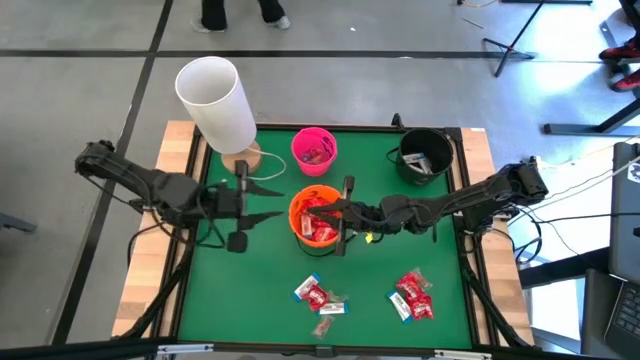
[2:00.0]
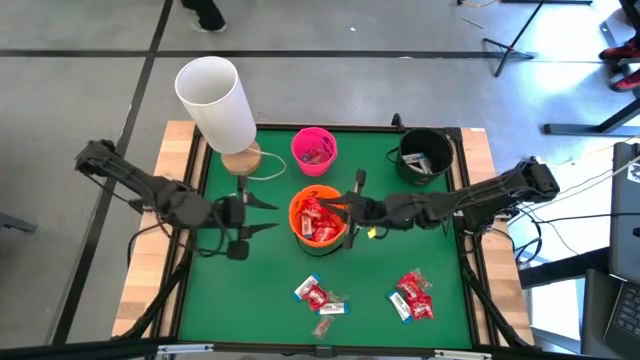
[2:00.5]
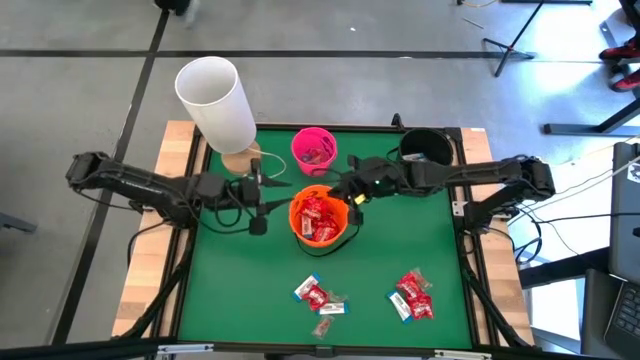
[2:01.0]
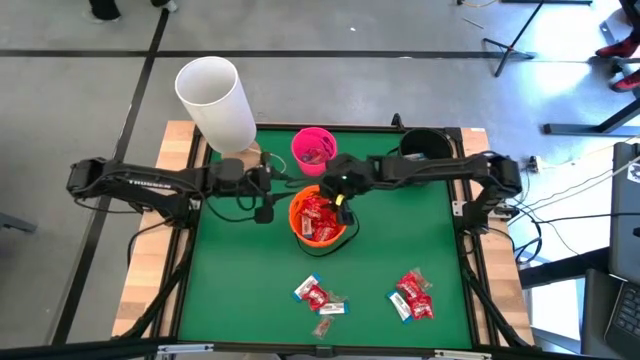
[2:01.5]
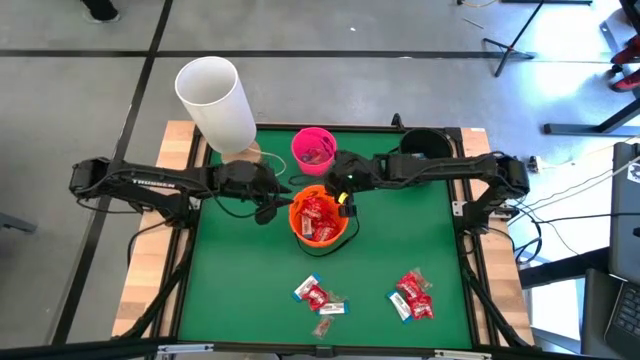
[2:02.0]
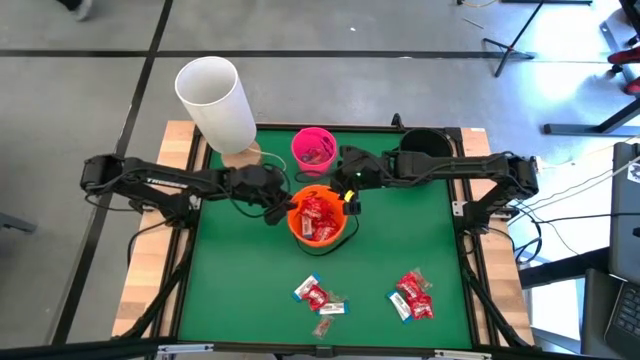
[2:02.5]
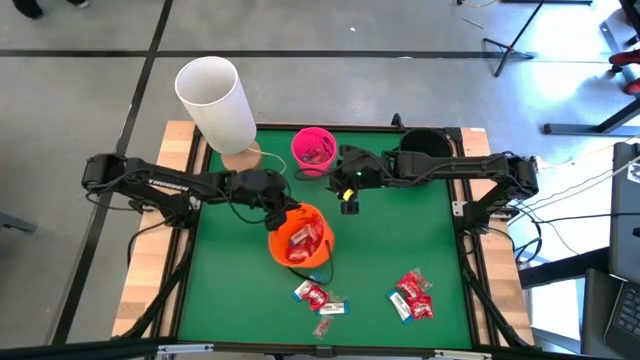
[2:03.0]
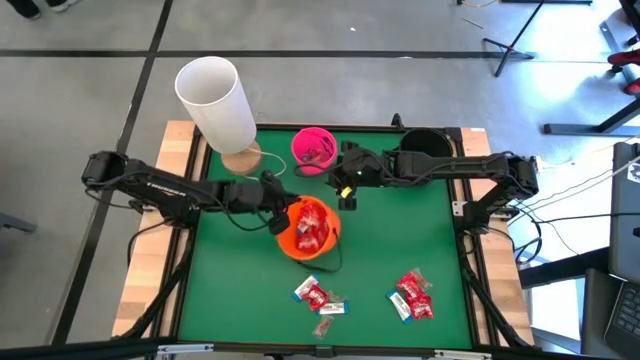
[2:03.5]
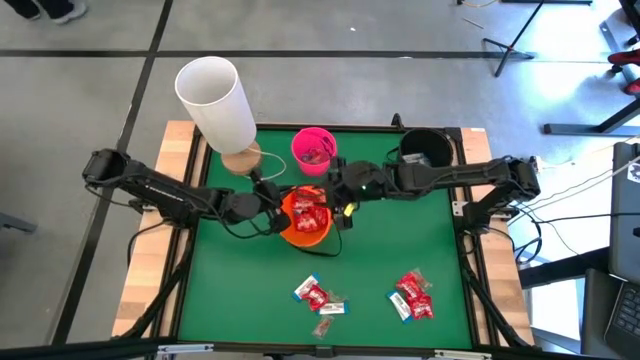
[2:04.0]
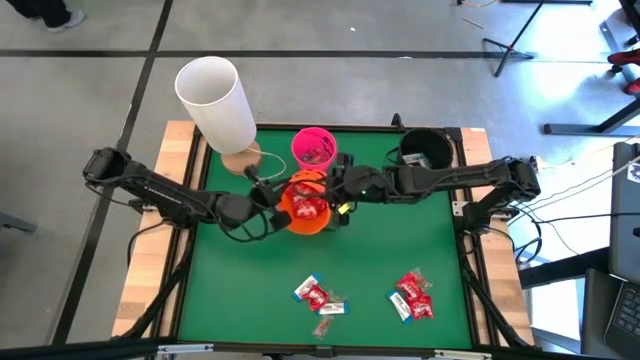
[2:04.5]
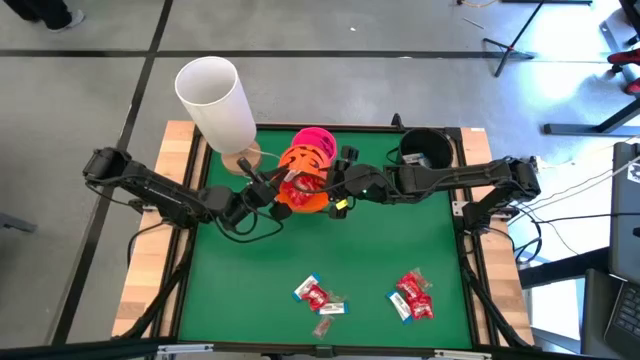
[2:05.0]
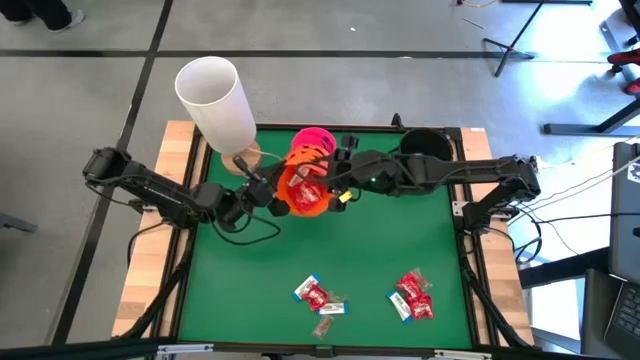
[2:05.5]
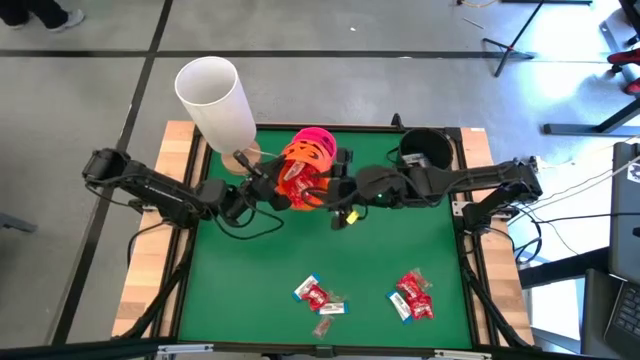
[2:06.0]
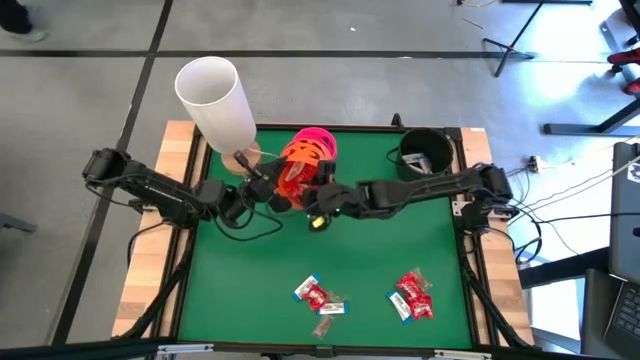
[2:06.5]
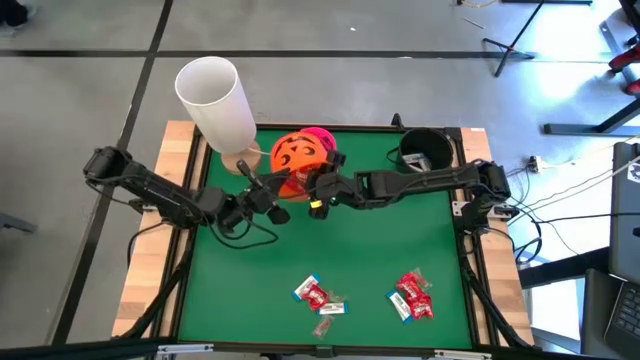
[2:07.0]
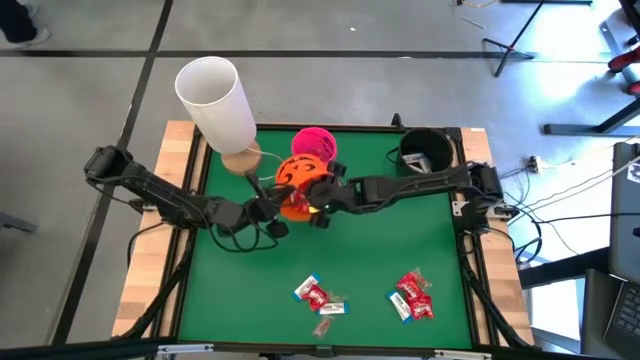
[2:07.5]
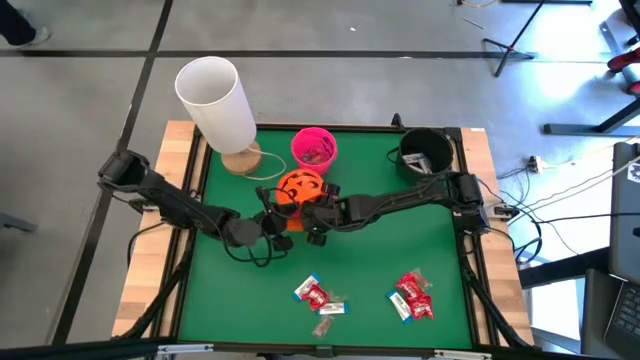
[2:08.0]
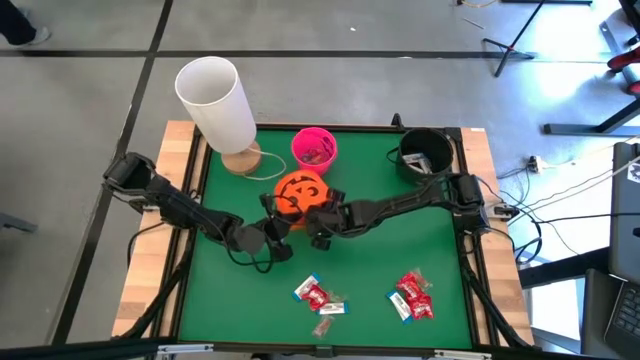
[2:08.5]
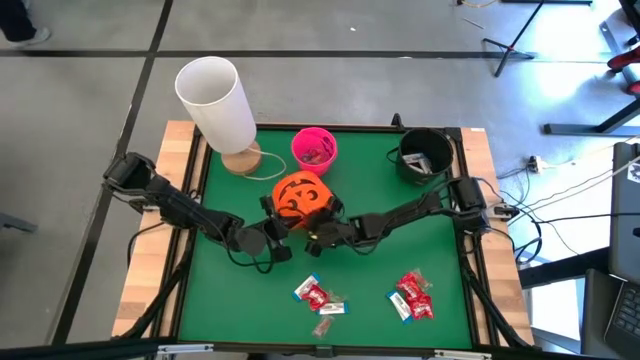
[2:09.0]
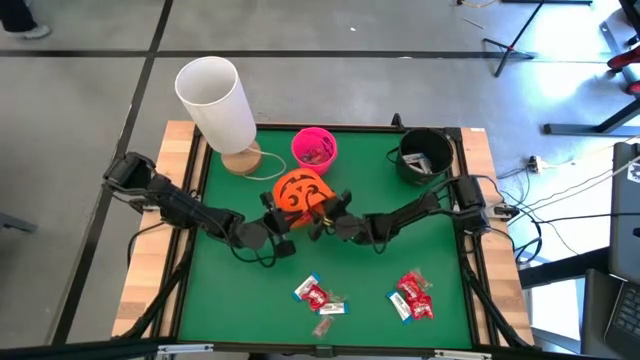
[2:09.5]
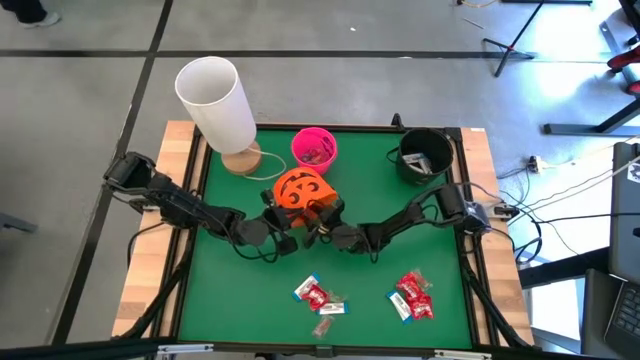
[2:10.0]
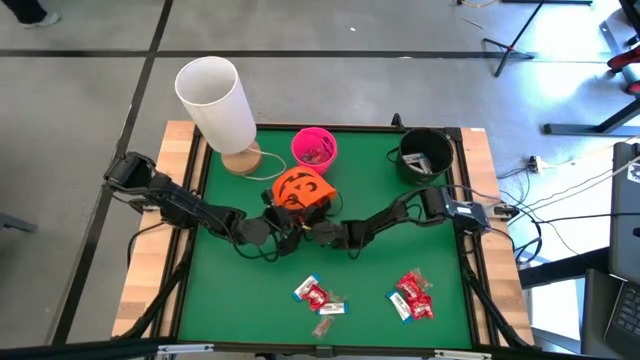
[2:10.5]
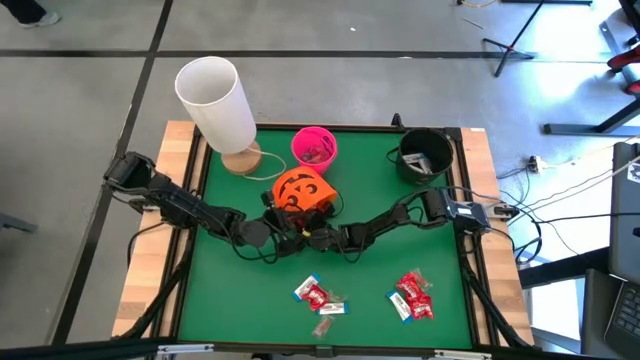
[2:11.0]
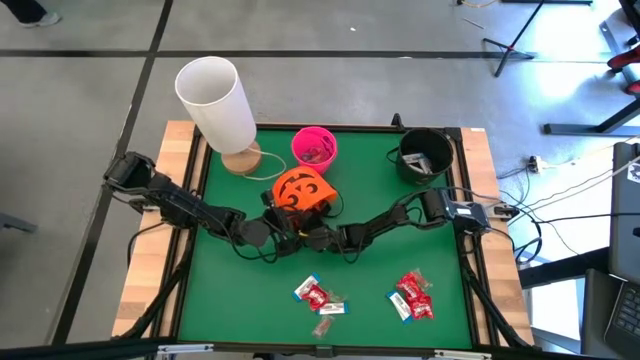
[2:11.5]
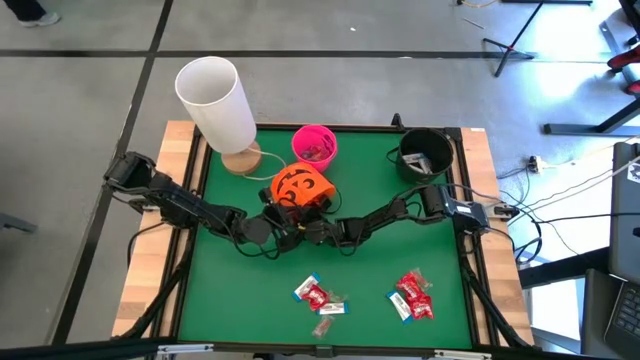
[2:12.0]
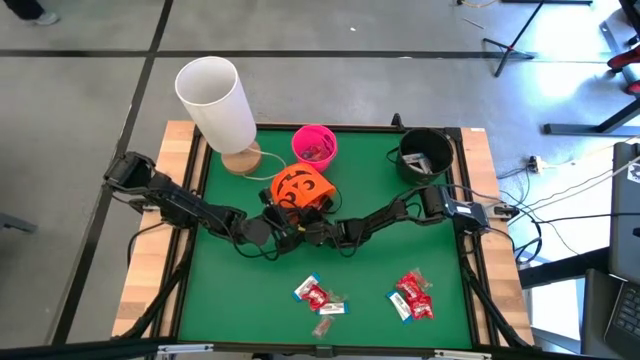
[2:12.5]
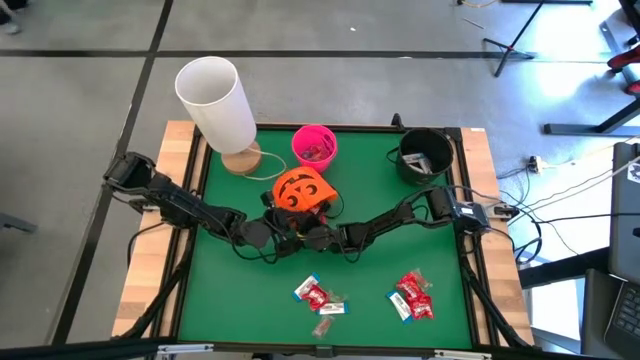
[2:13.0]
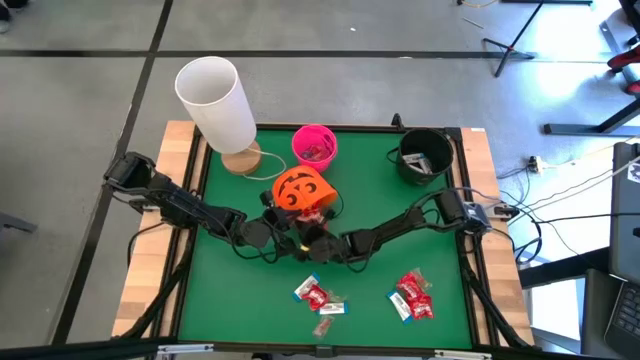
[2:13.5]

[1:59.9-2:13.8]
Task: Sort candy
Remove the white candy from the orange bin

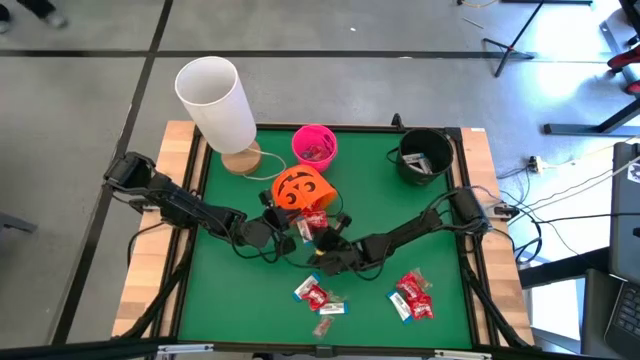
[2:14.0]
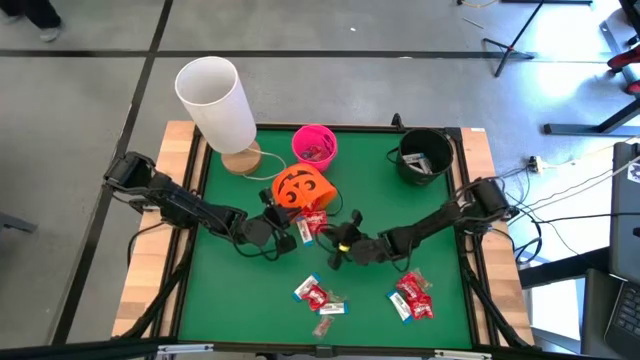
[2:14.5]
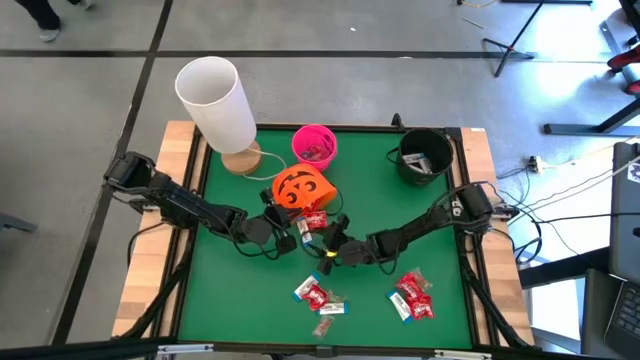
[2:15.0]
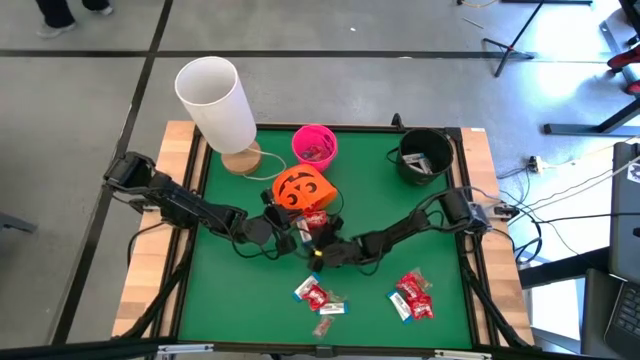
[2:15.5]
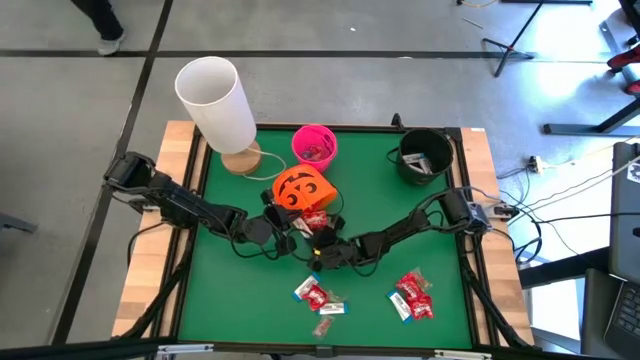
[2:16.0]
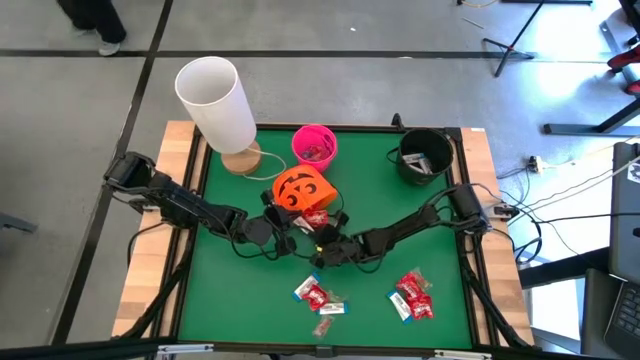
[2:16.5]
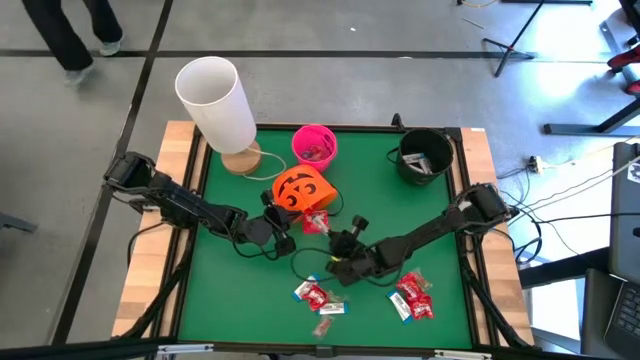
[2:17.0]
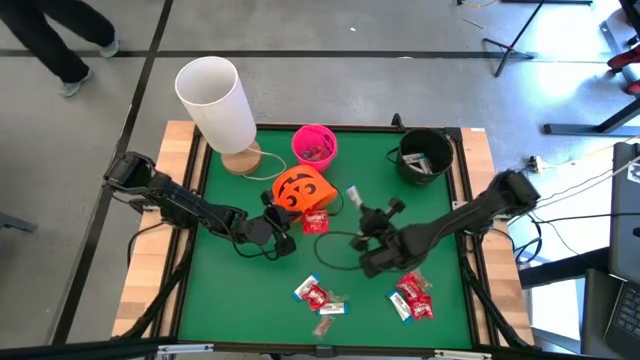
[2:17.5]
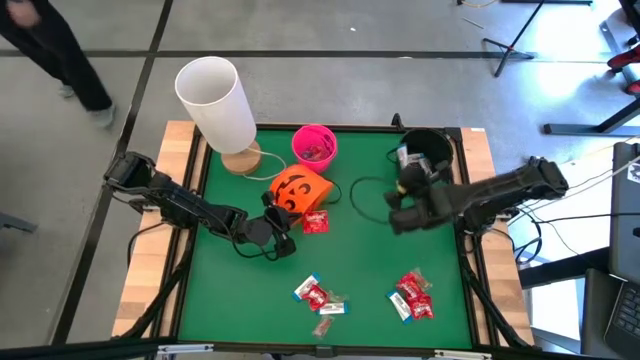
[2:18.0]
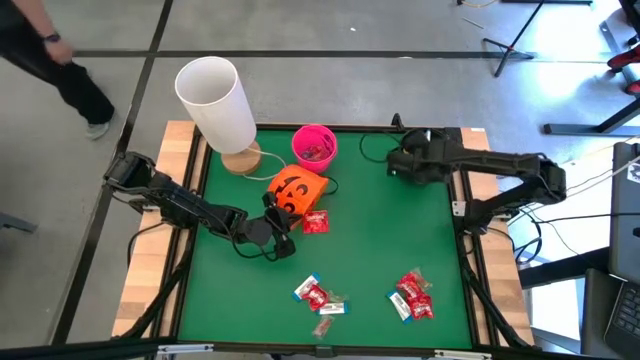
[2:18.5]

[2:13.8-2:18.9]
Put the white candy into the top bucket

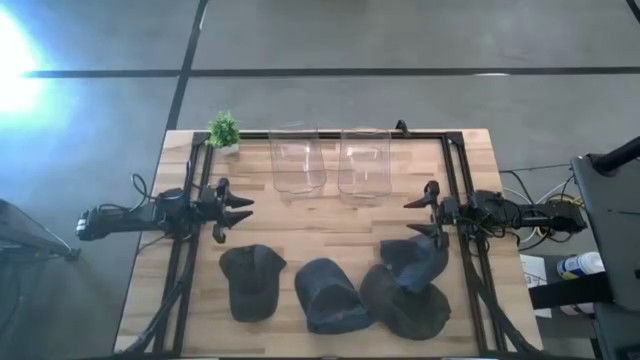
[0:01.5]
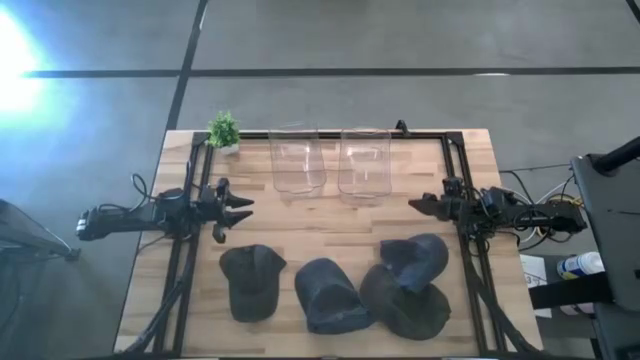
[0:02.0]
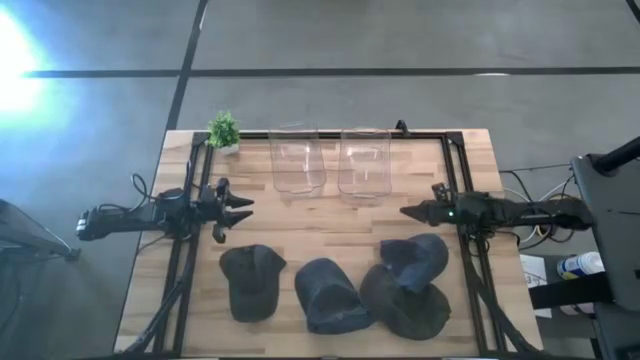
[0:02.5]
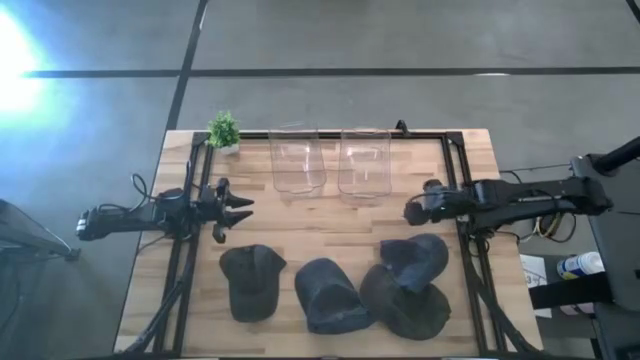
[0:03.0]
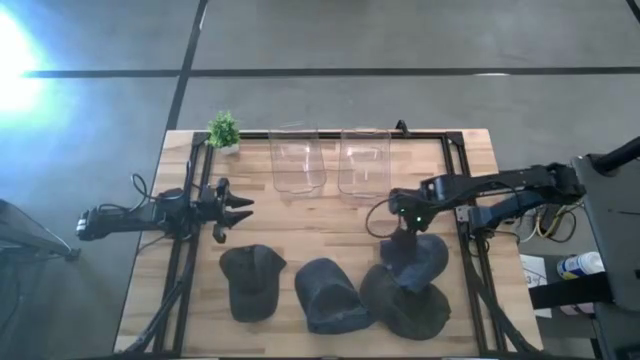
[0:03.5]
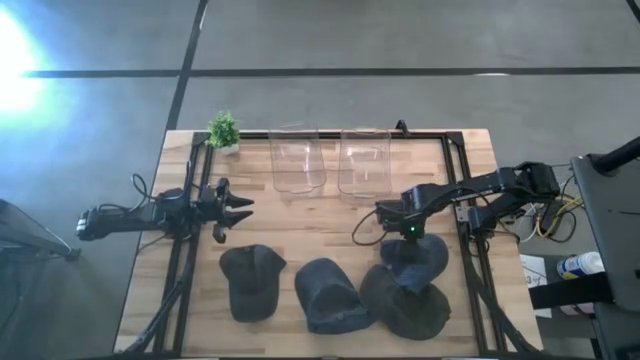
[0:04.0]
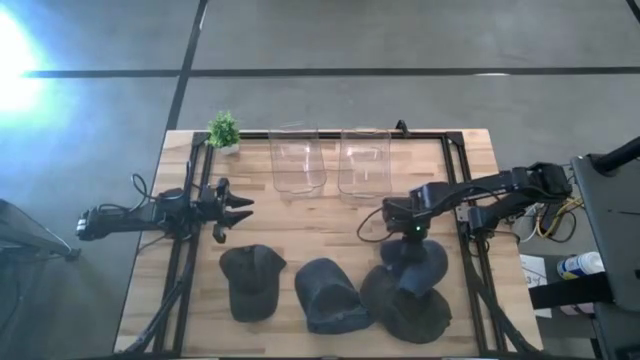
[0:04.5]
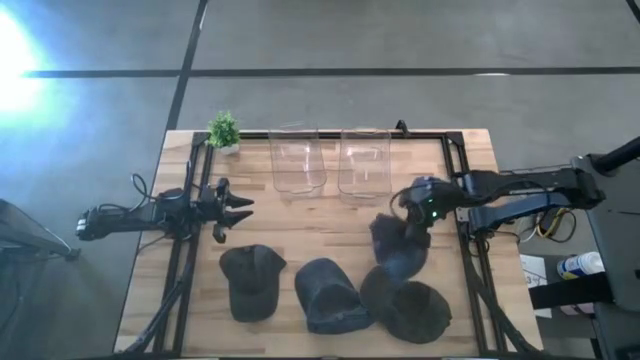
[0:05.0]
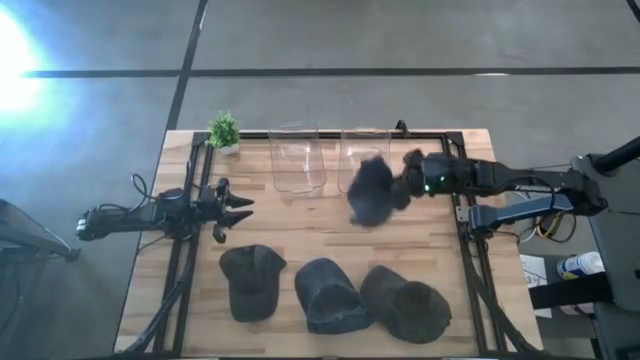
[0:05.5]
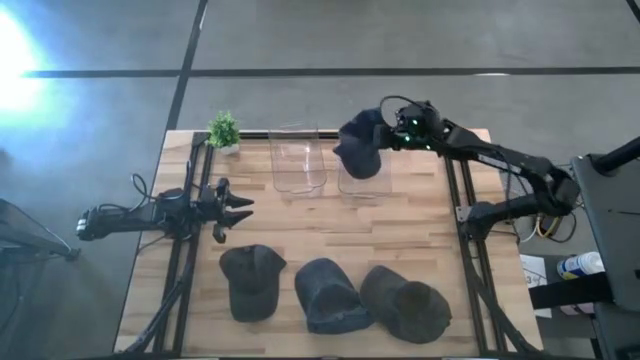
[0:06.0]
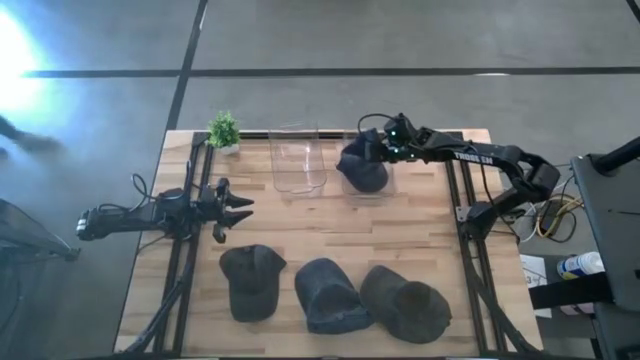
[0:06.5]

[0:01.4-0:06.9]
Task: Pick & Place hat
Put the right blue cap into the right transparent bin
